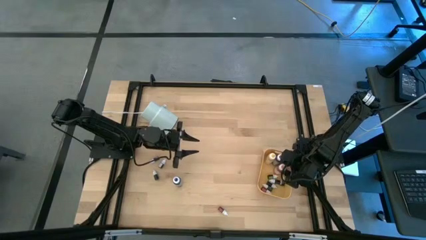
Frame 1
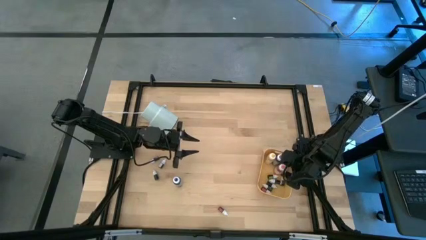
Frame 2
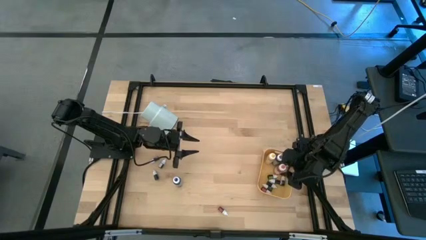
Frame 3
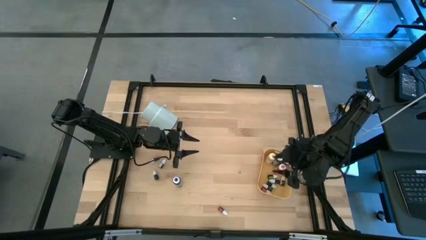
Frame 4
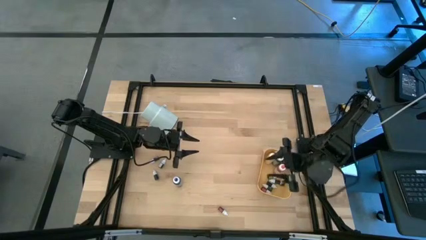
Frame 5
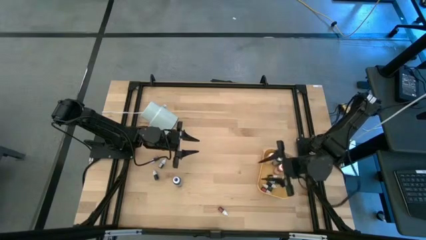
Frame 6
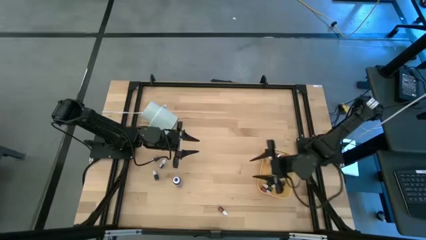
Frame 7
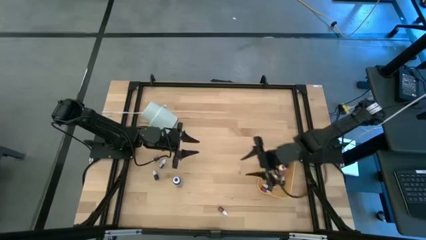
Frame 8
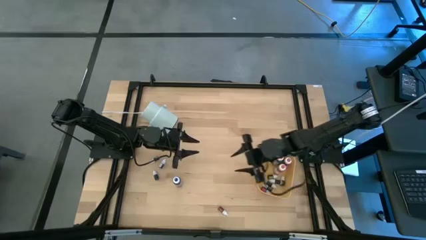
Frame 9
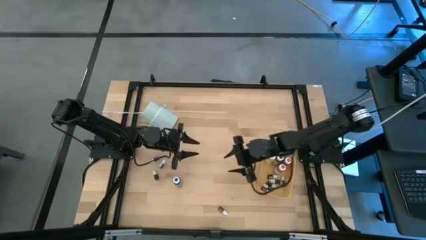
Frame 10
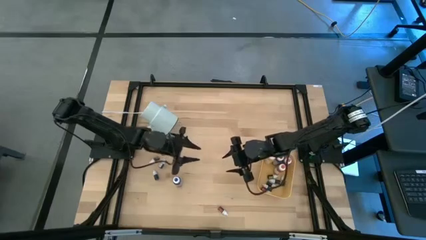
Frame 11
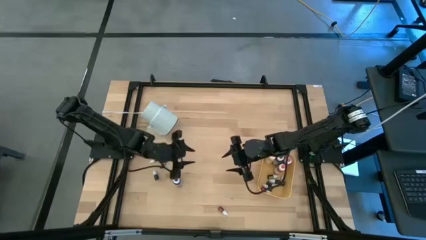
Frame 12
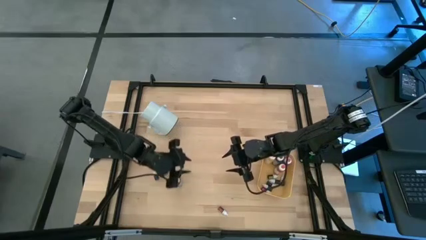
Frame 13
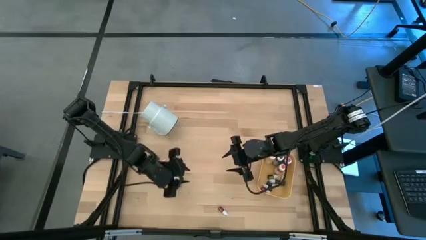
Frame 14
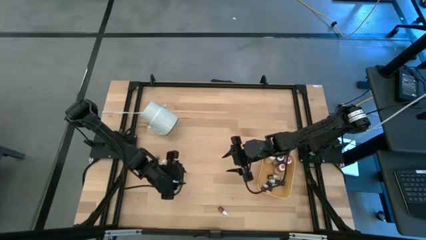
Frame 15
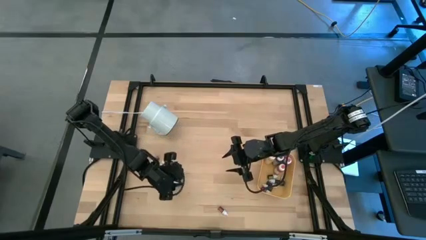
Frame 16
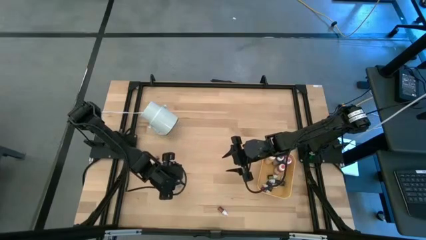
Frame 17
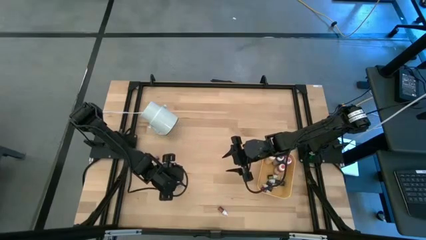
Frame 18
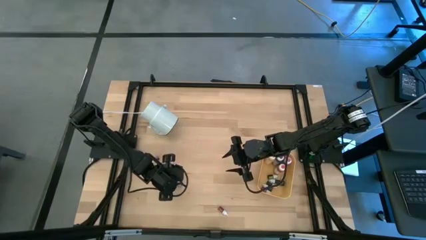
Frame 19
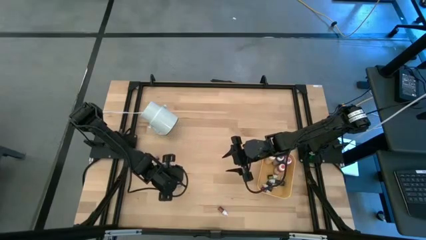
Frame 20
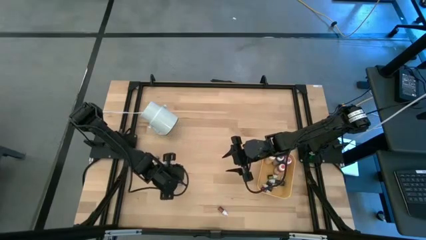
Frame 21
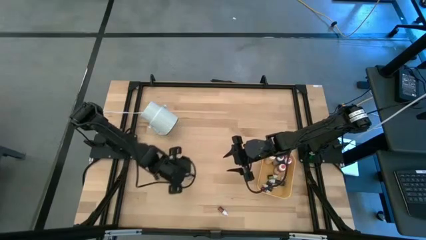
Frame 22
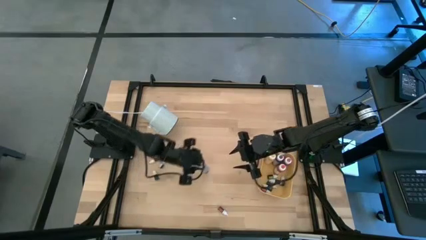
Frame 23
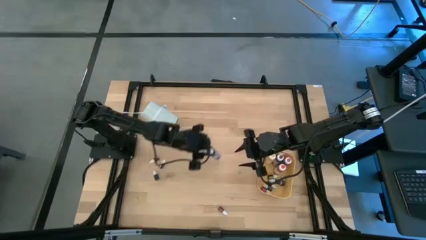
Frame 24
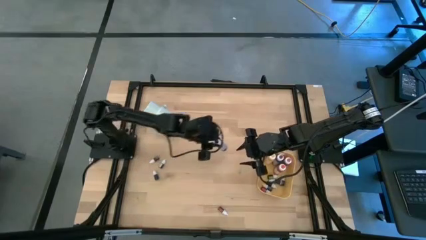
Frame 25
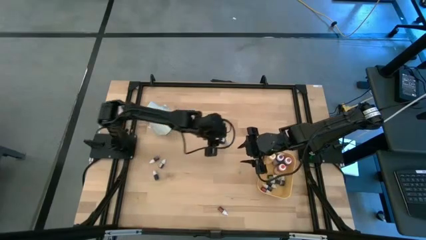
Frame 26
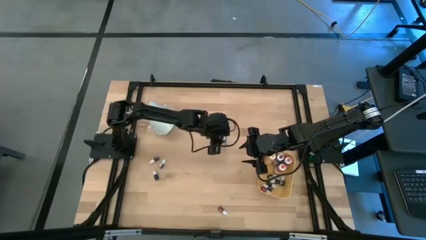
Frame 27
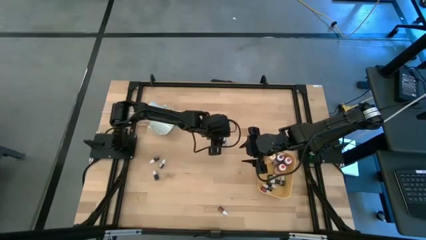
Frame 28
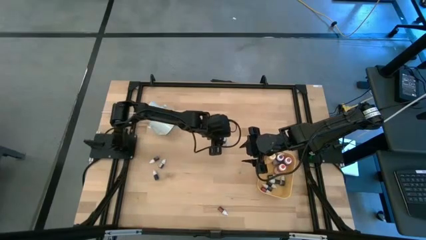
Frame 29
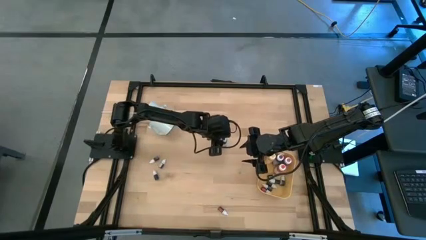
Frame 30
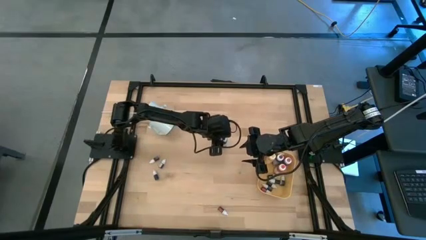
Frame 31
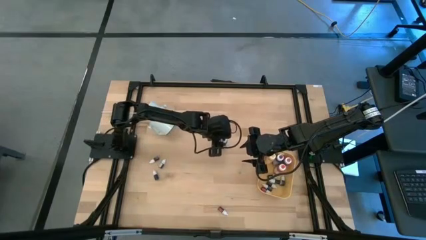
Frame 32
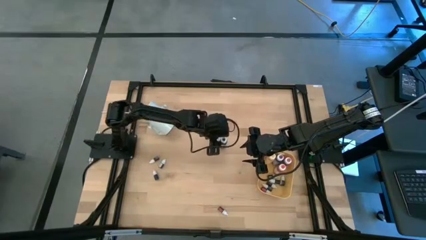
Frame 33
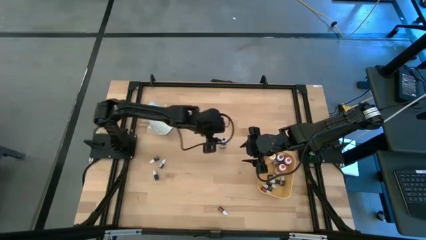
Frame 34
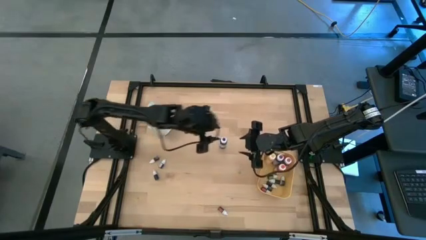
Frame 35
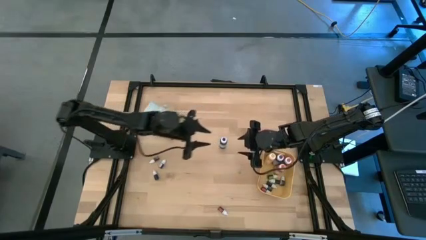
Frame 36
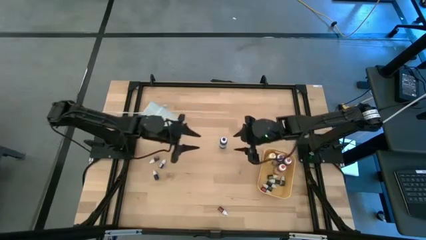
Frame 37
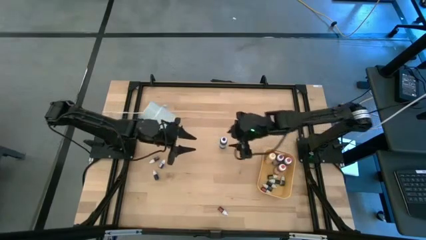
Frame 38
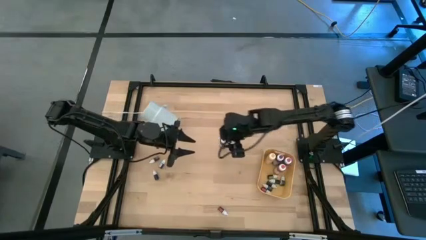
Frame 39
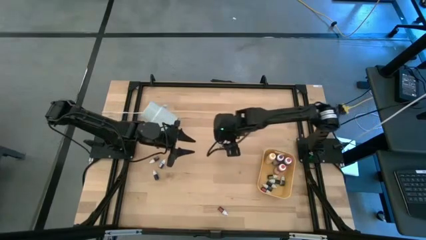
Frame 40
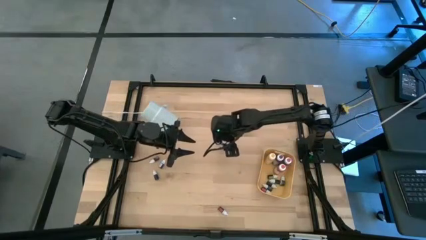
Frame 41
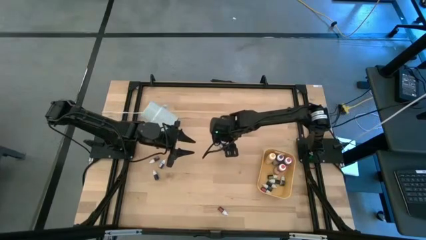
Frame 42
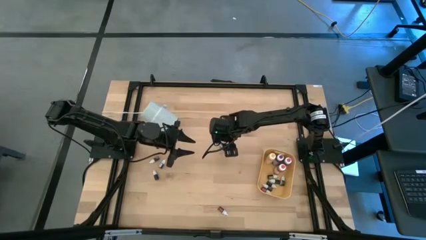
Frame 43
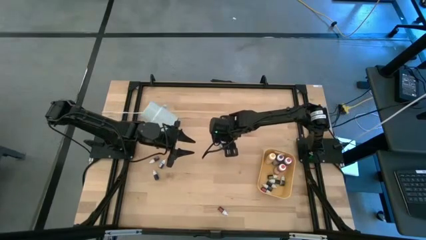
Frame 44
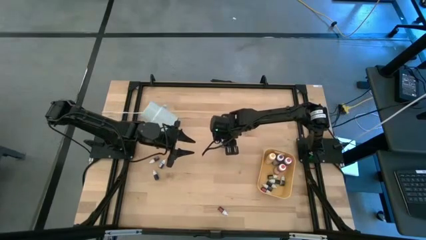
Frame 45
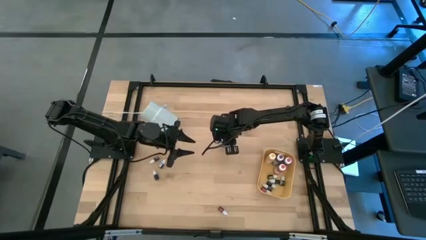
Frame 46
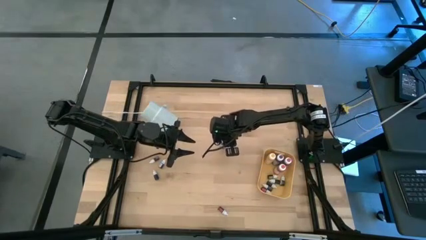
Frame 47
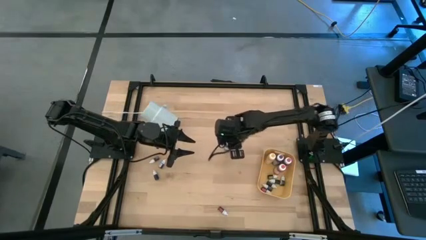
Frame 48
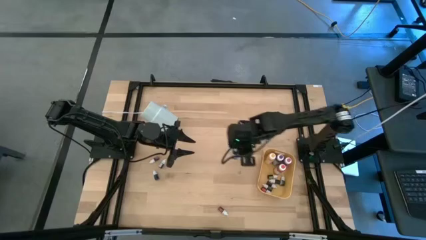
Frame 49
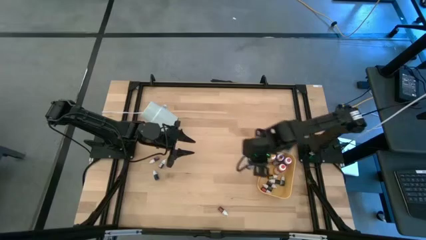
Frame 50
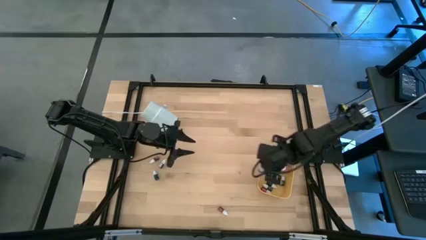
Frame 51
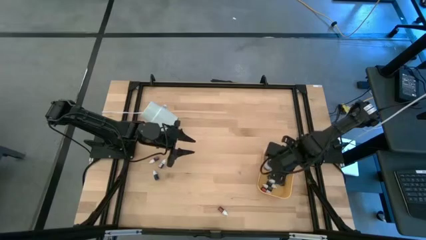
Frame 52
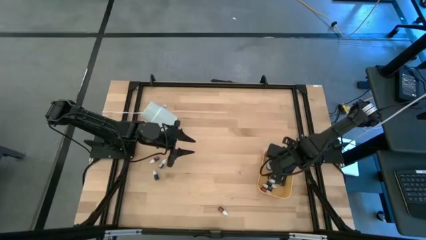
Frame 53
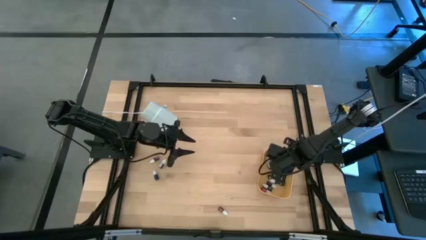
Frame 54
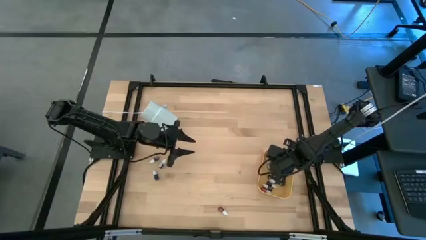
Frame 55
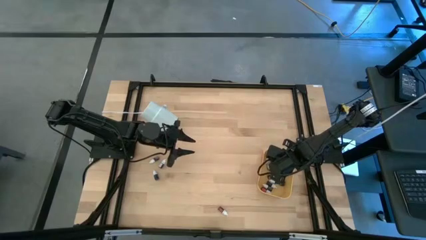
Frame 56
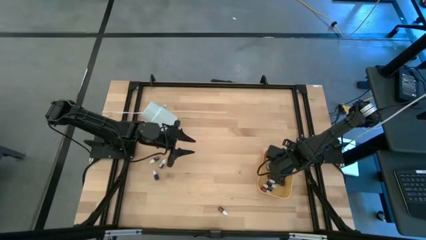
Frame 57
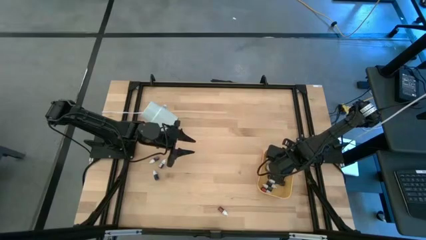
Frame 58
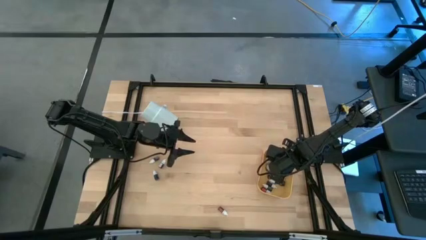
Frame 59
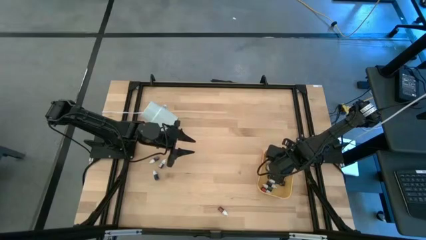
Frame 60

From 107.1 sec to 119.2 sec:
Task: Pick & Place food coloring
Put the large blue food coloring bottle into the yellow bin
